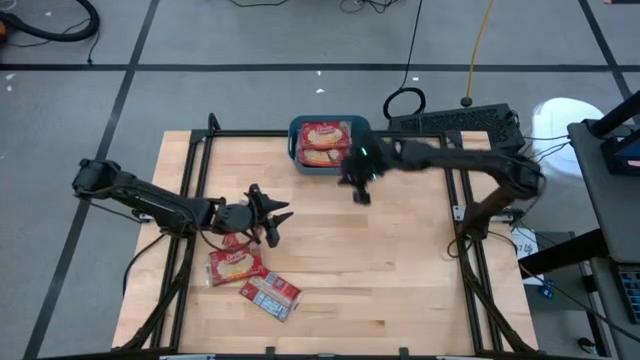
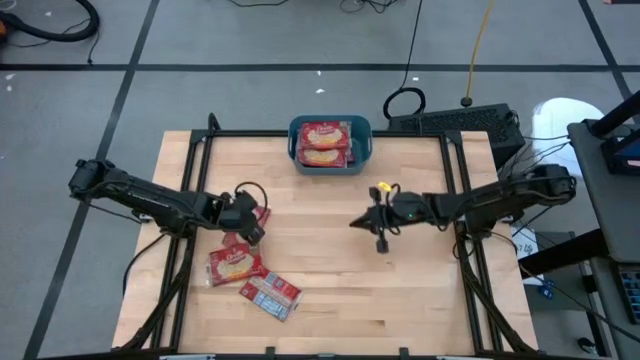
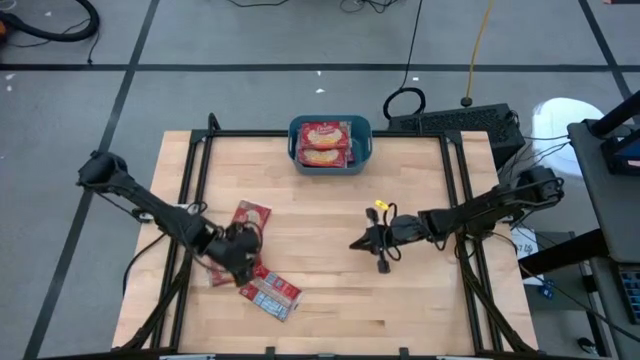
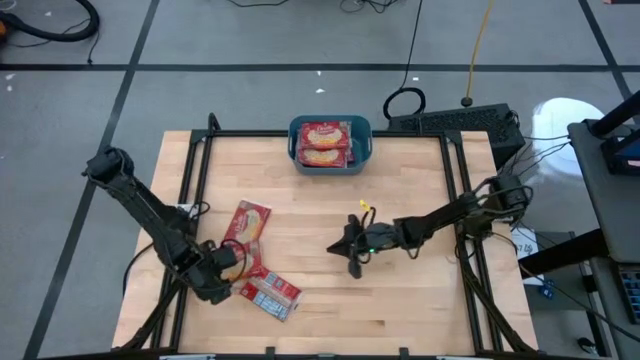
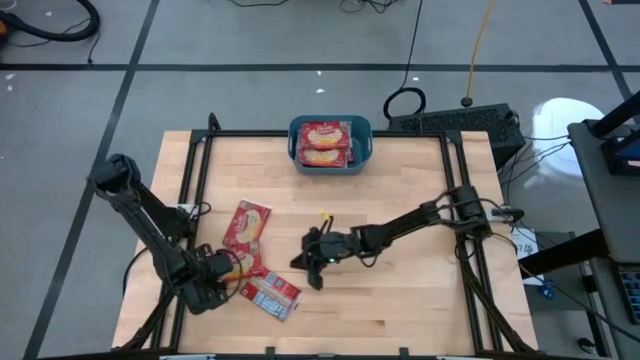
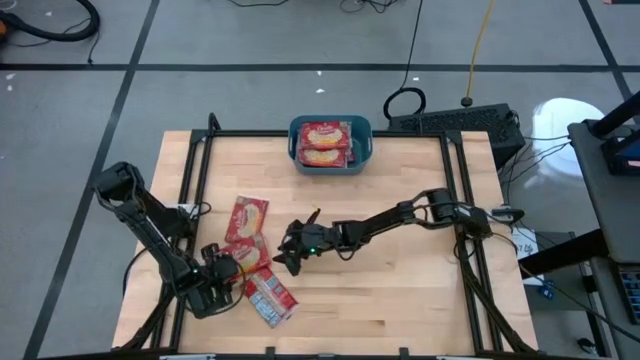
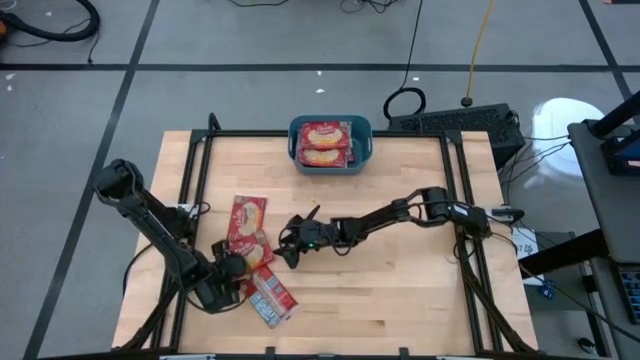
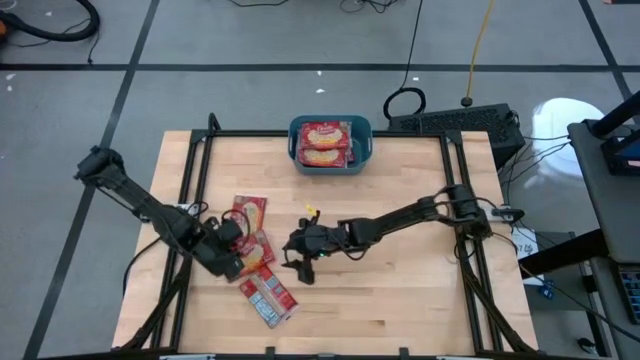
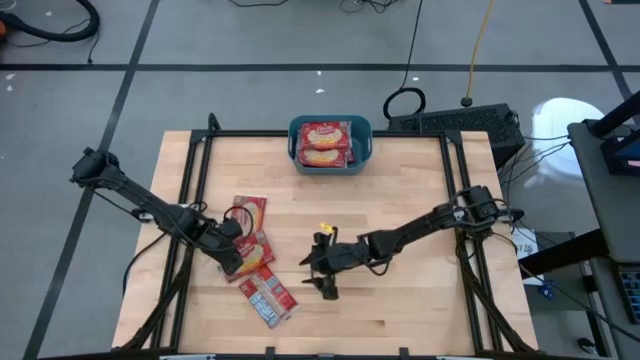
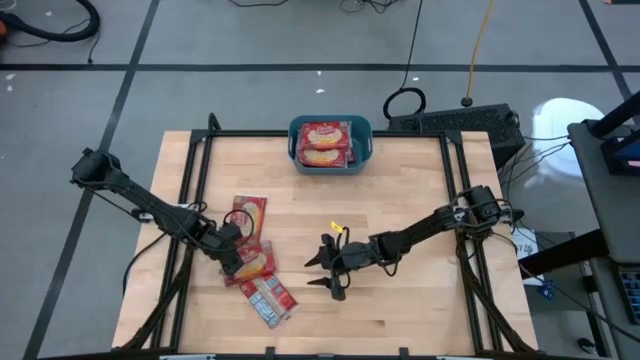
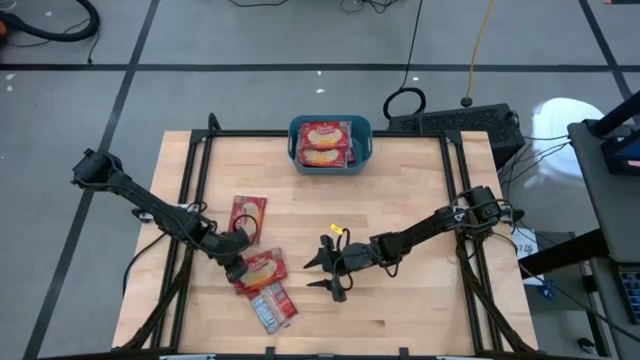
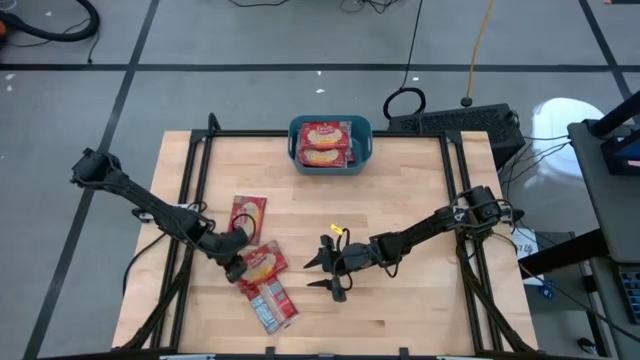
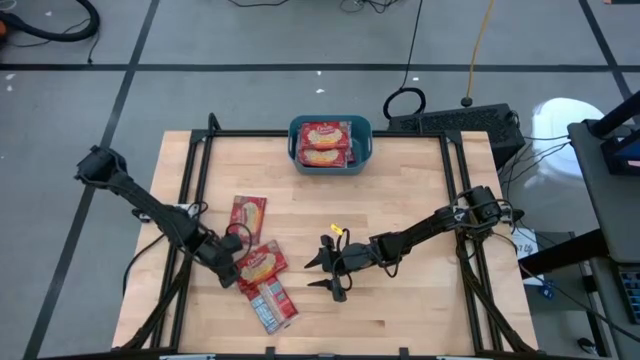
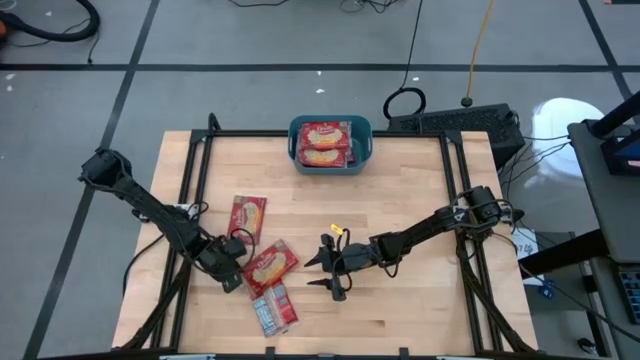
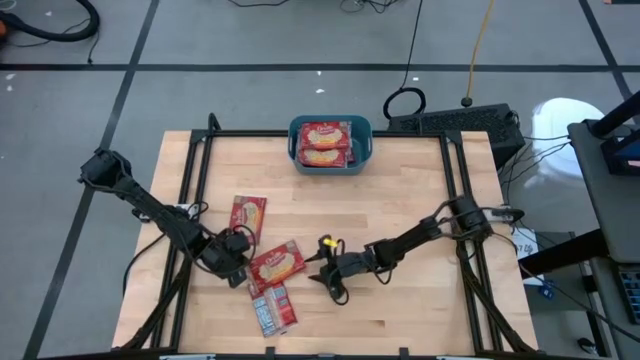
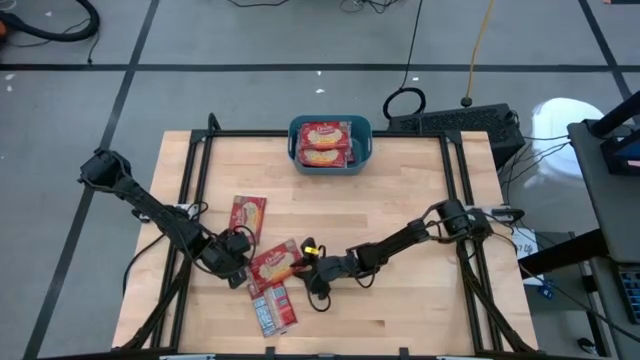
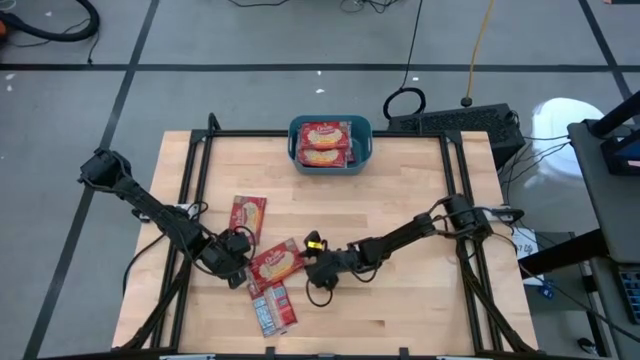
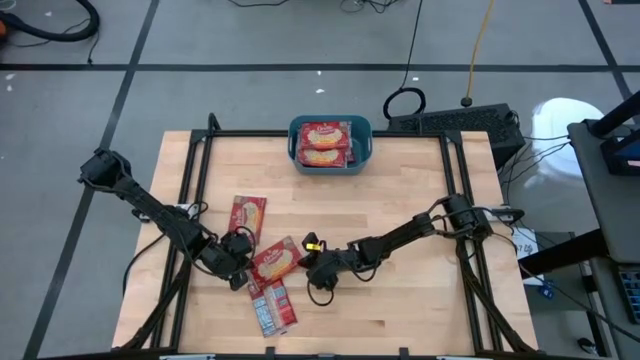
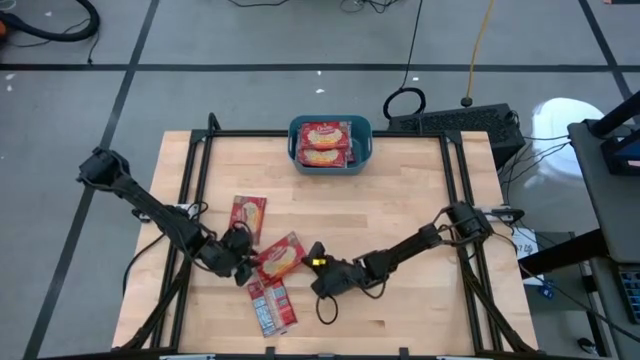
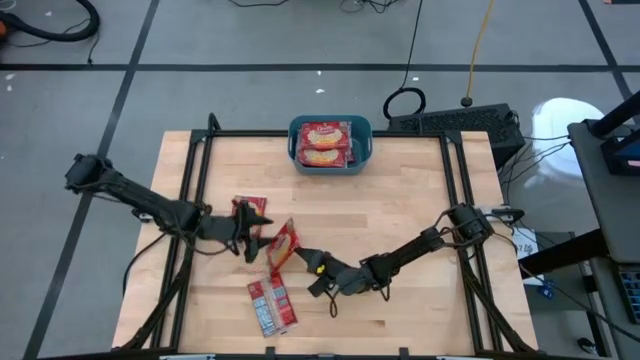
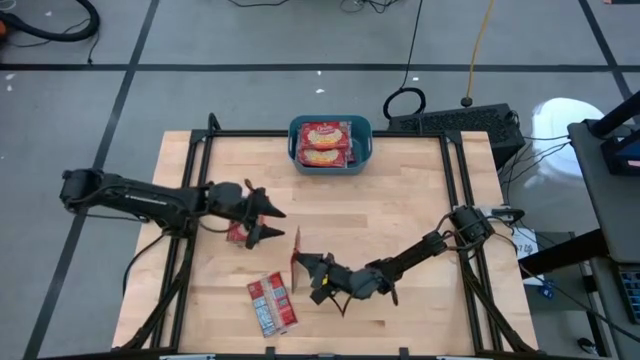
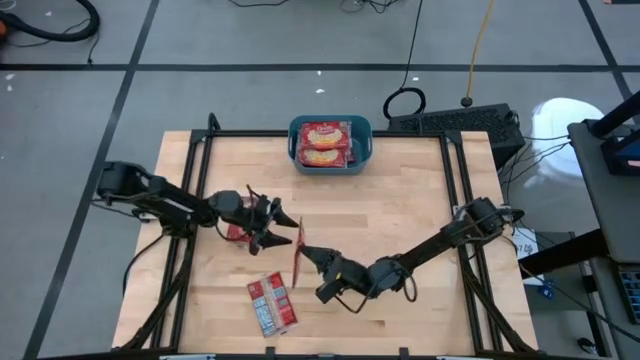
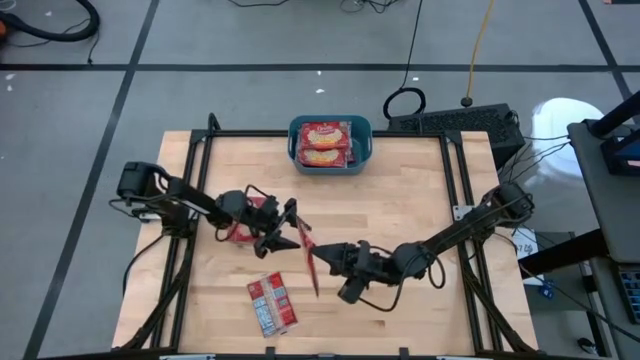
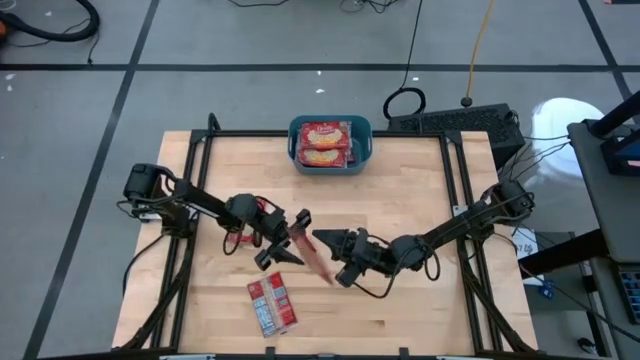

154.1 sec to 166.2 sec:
Task: Sort popcorn bags into baskets
Put the red popcorn bag into the blue bin

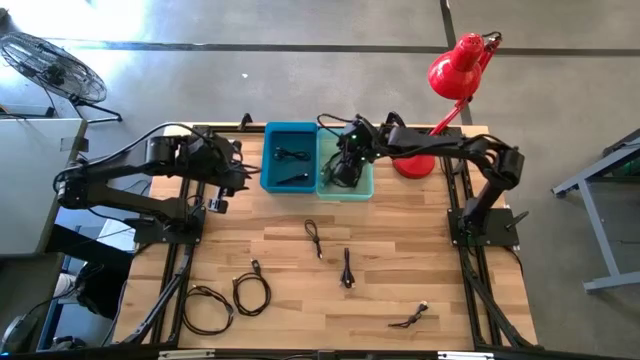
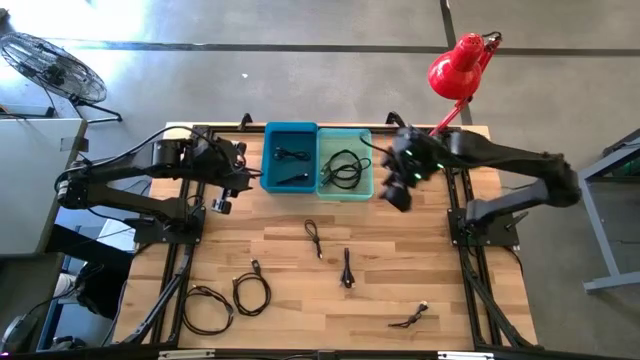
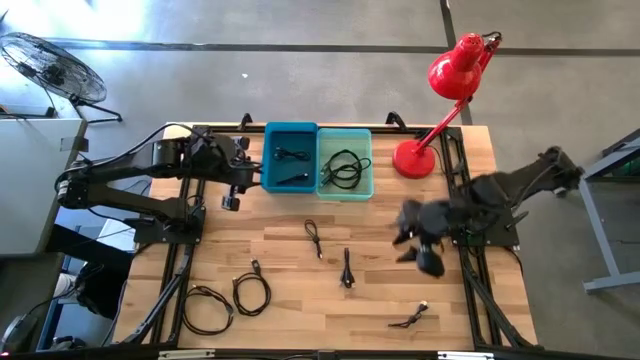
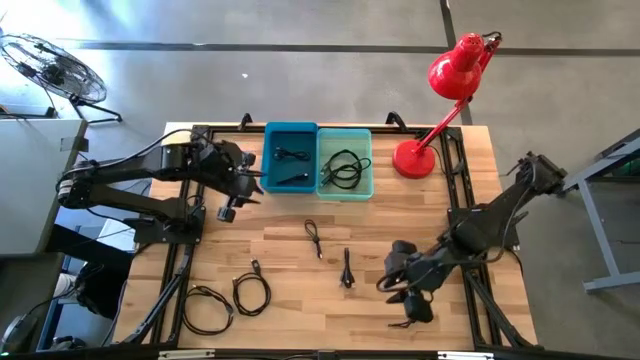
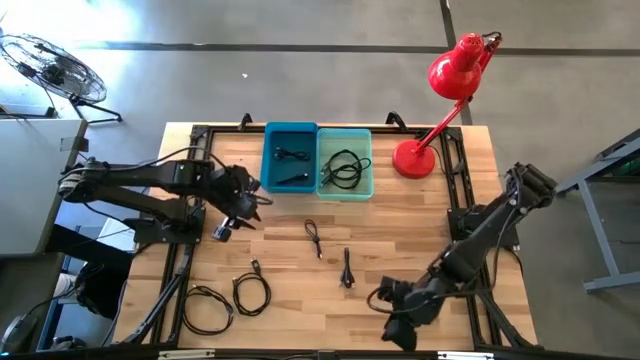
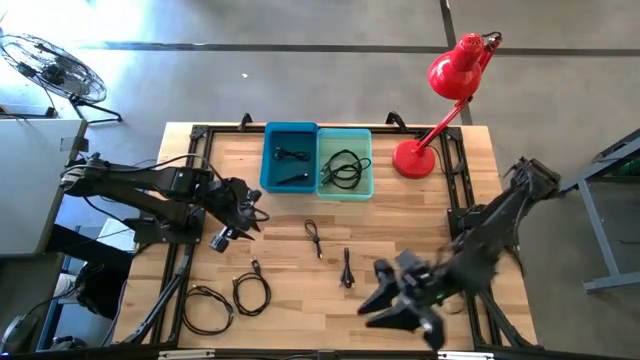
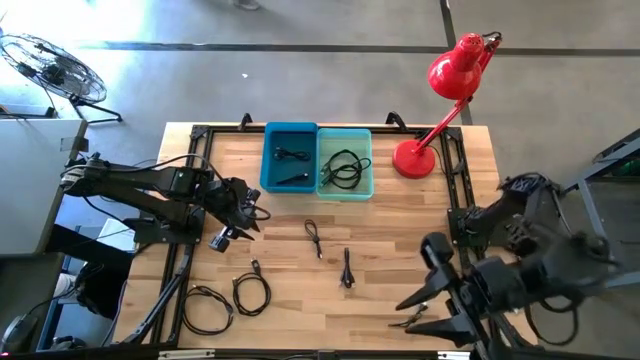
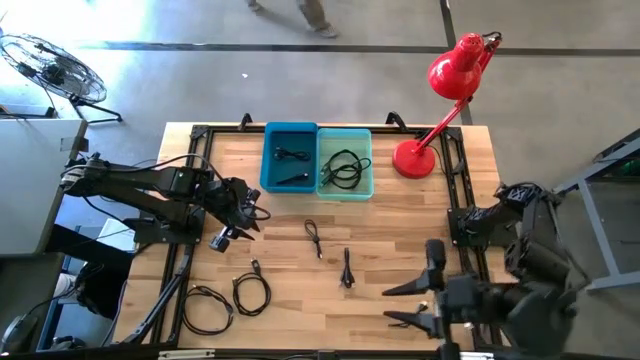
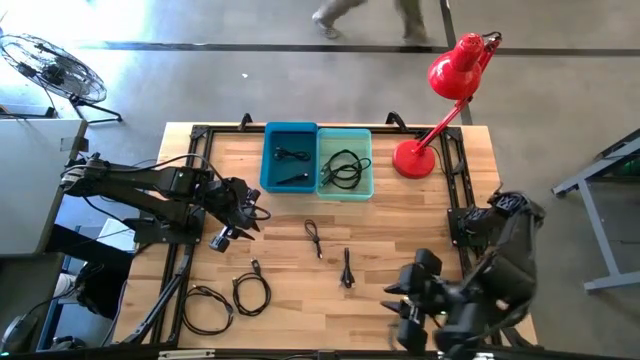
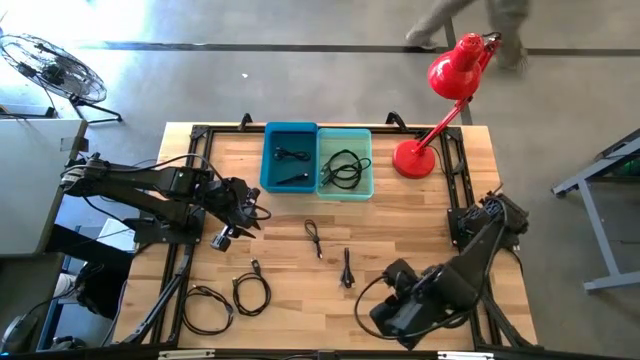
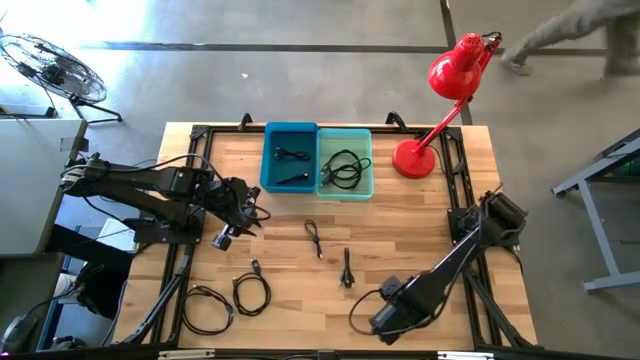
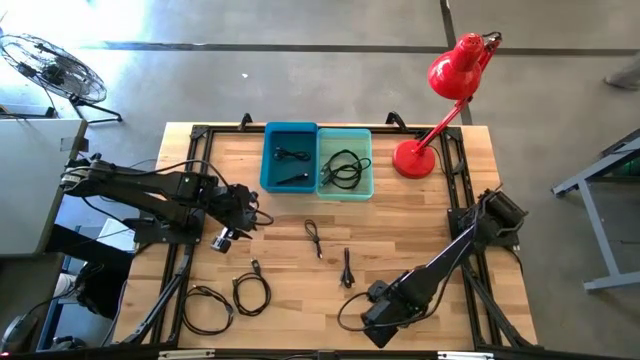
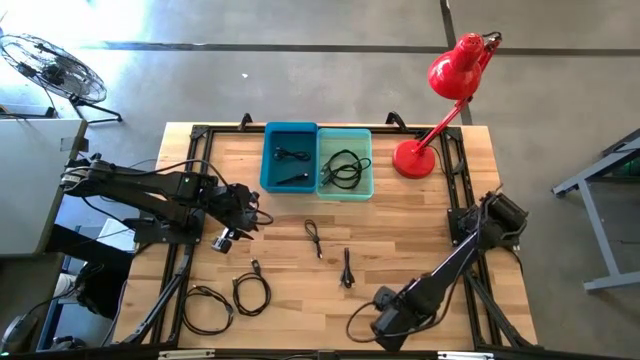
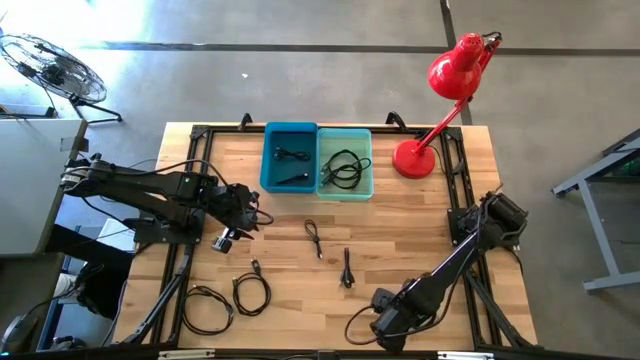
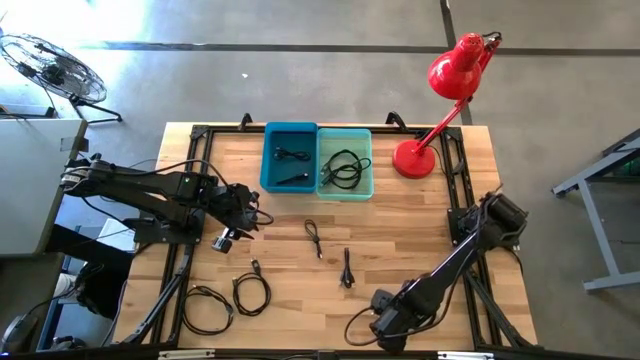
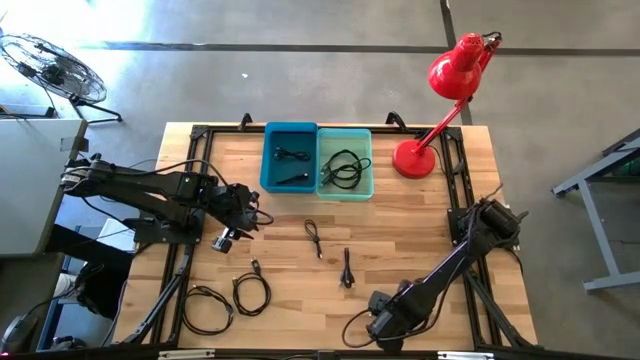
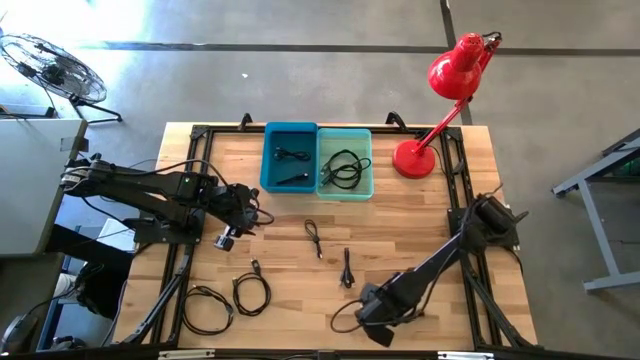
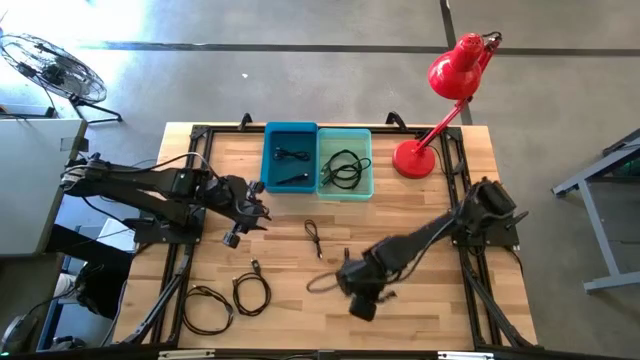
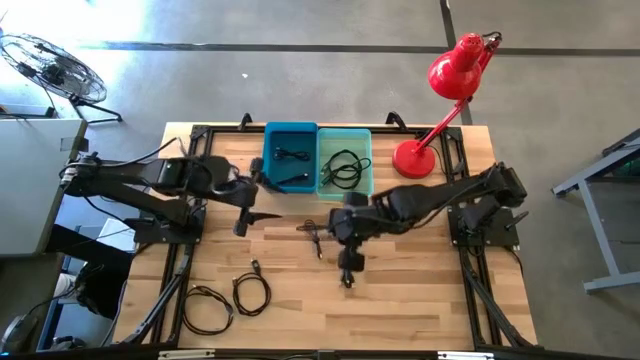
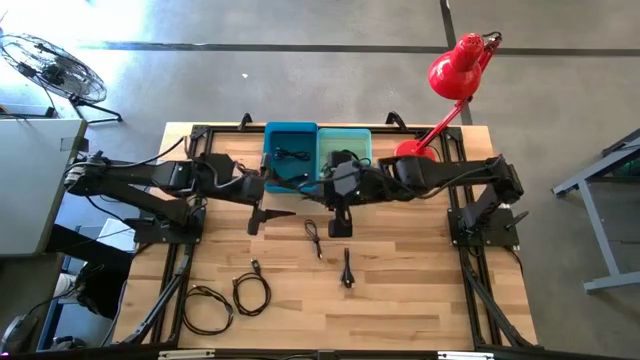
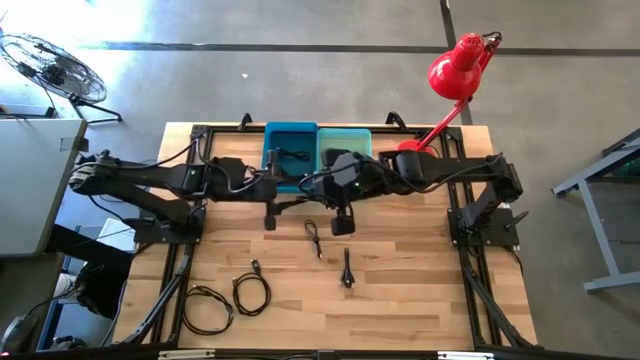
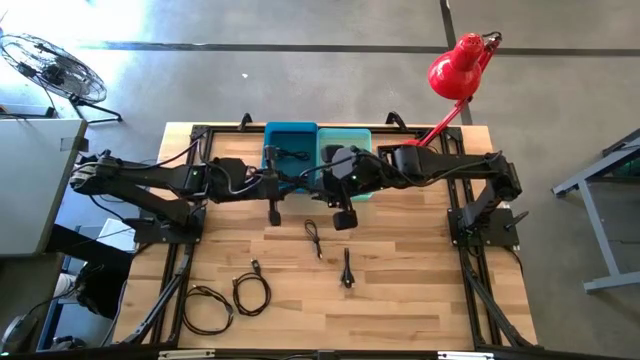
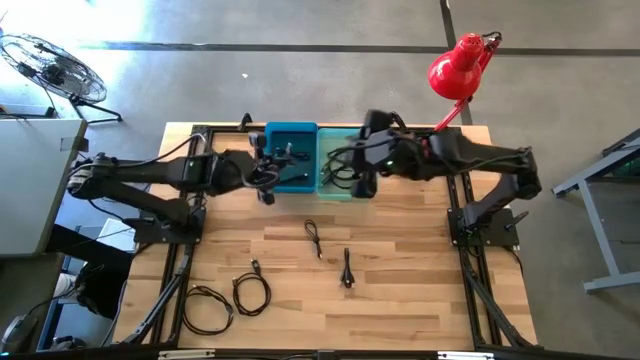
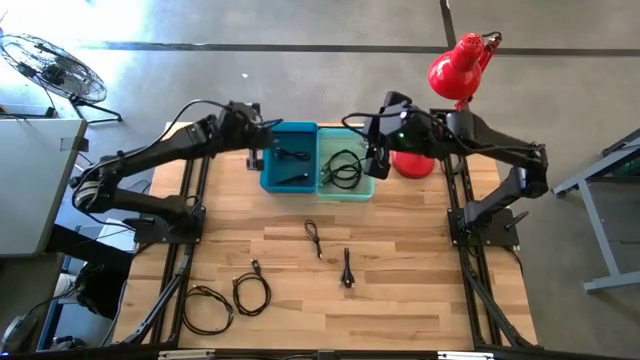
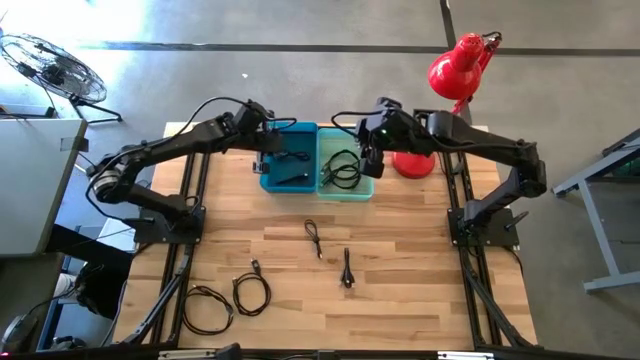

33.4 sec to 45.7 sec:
Task: Pick & Place USB Port
Put the black USB cable into the blue bin
